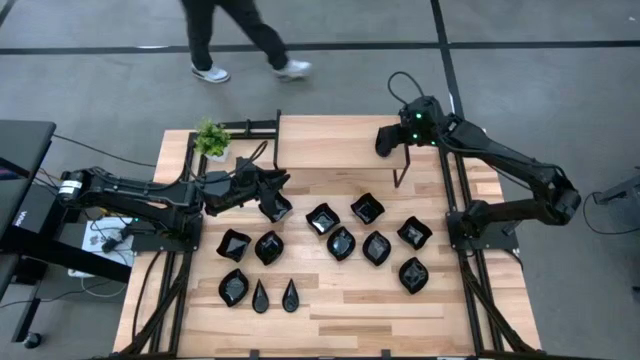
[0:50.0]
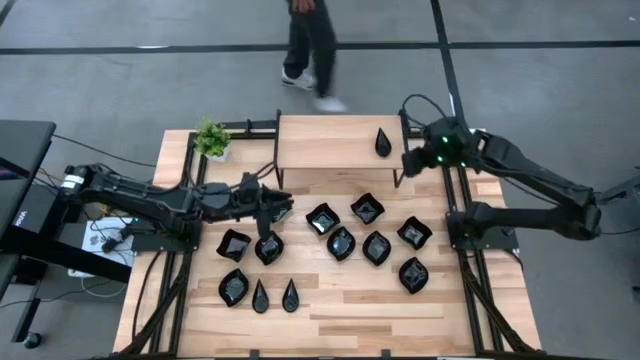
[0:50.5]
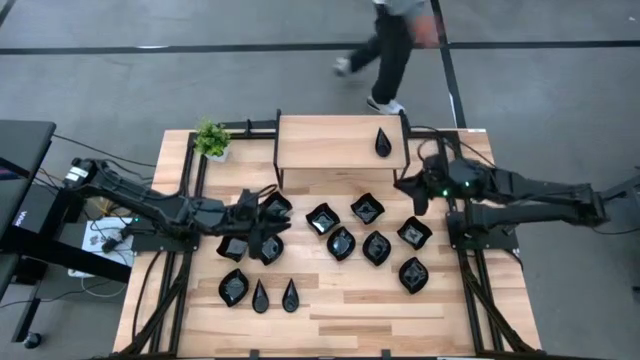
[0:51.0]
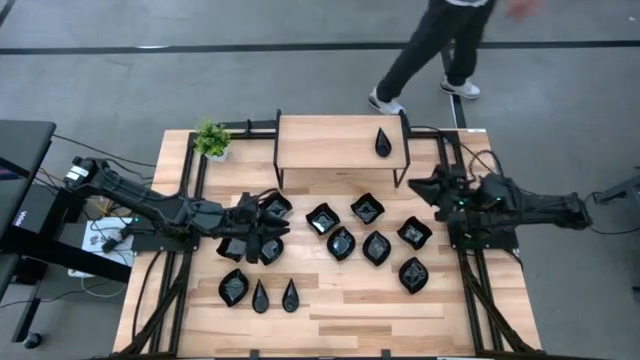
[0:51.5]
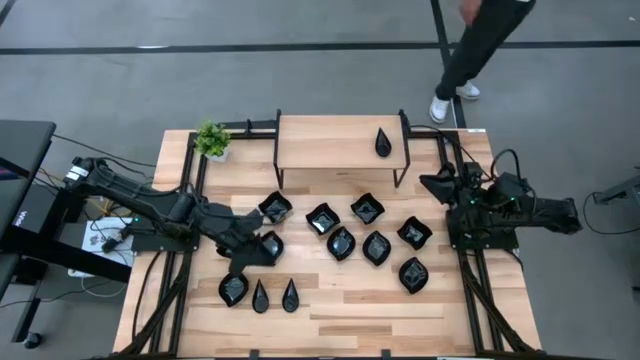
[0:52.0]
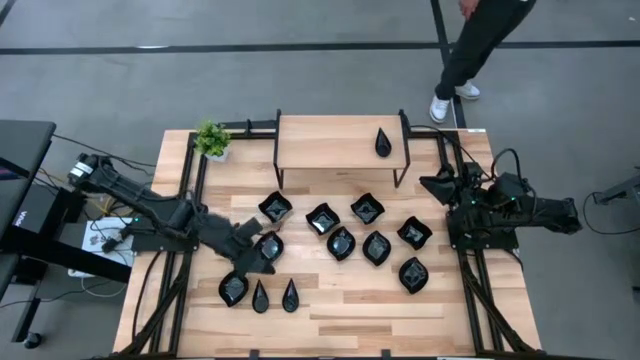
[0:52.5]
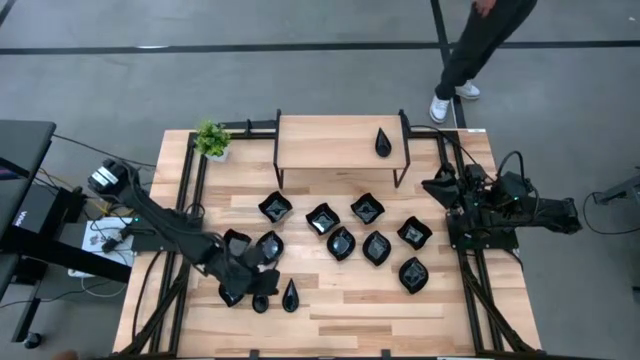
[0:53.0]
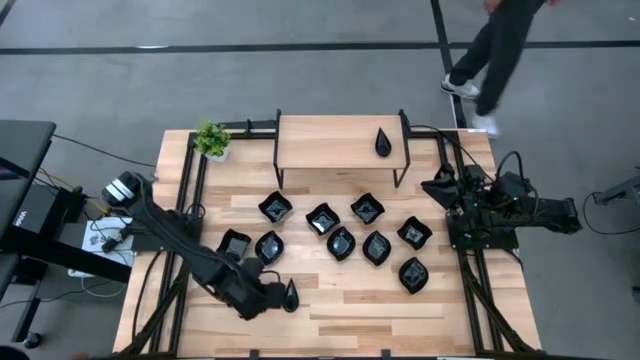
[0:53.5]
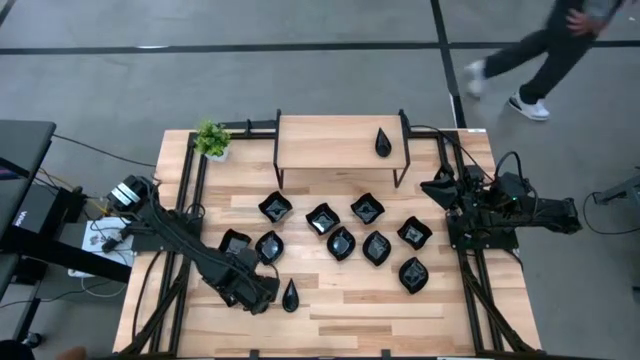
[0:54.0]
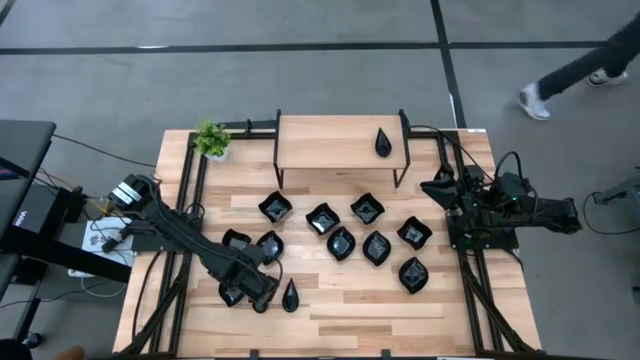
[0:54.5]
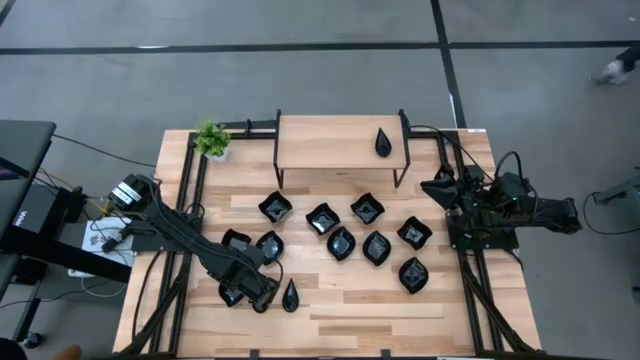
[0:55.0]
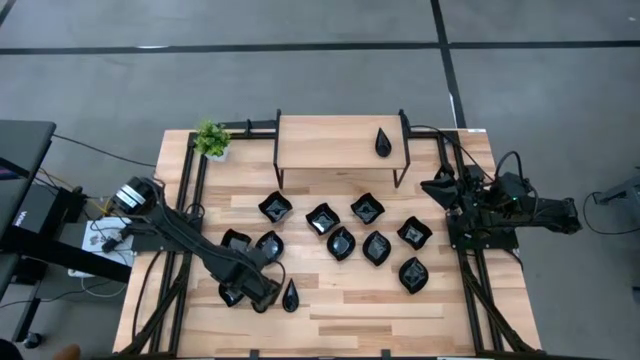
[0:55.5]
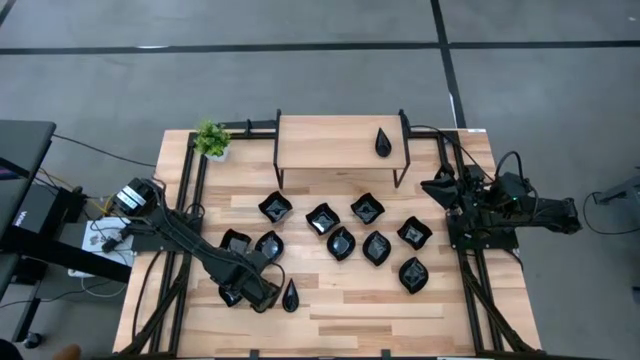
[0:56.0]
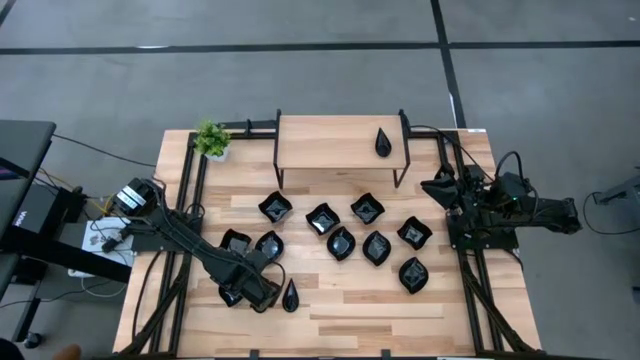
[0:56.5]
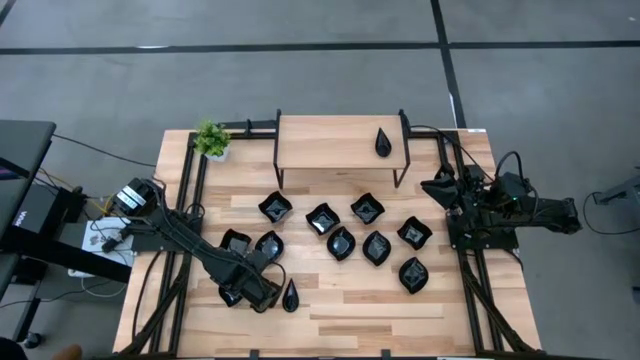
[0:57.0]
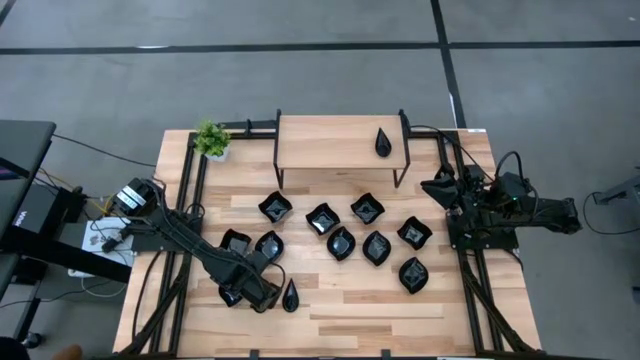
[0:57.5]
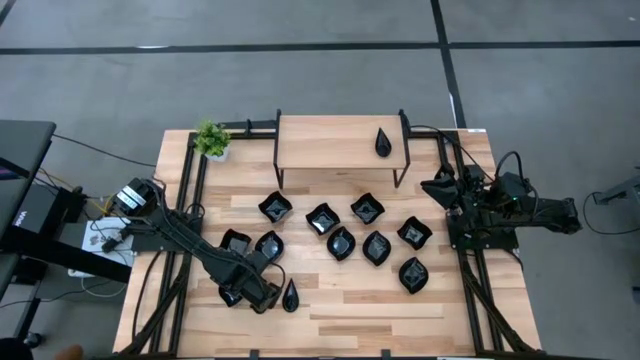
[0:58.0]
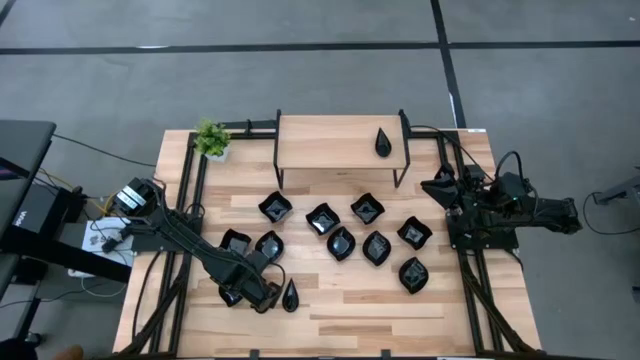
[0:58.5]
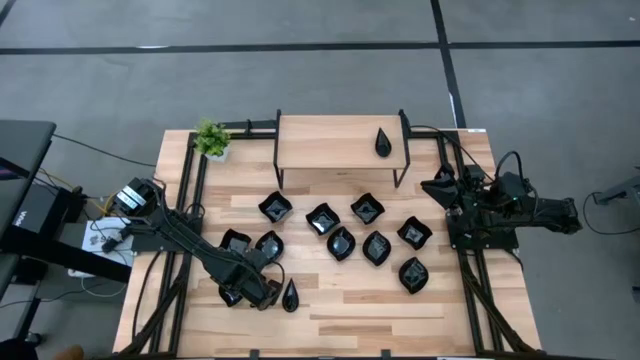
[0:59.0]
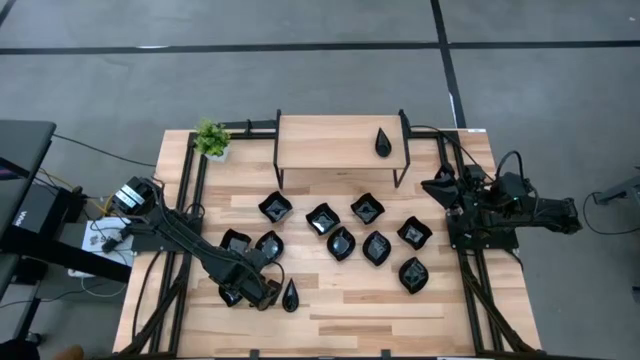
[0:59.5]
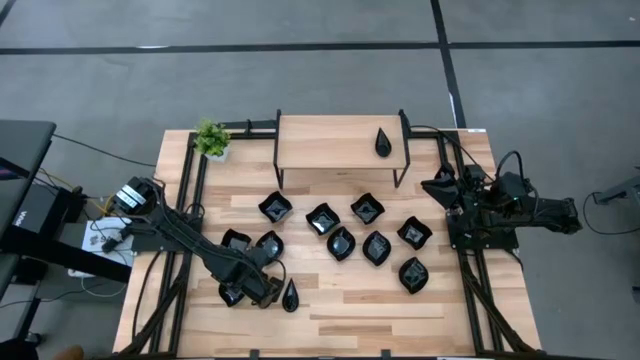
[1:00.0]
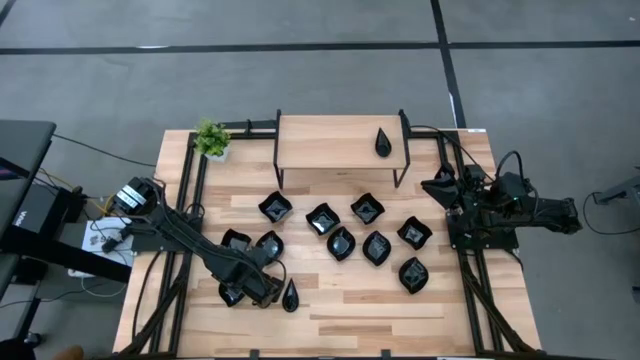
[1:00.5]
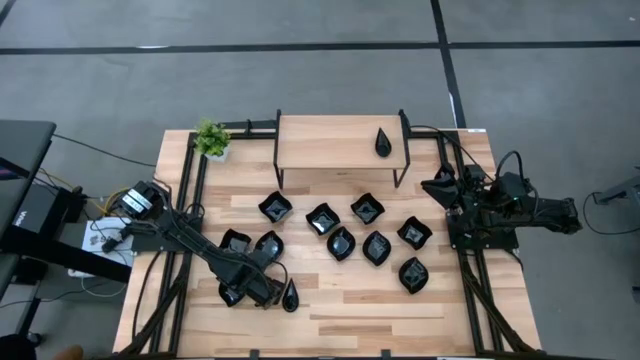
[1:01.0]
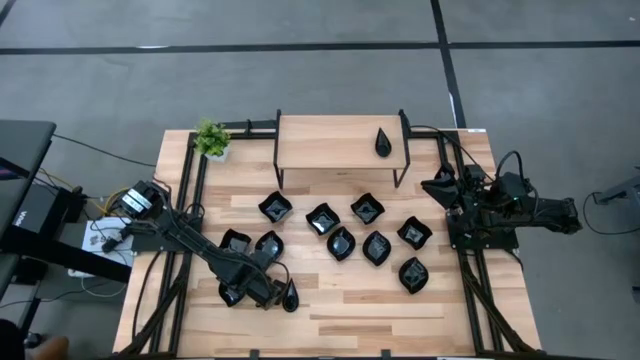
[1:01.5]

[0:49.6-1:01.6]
Task: Pick & Place Mini shaped plates
Stack the black plate on top of the black plate on the shelf

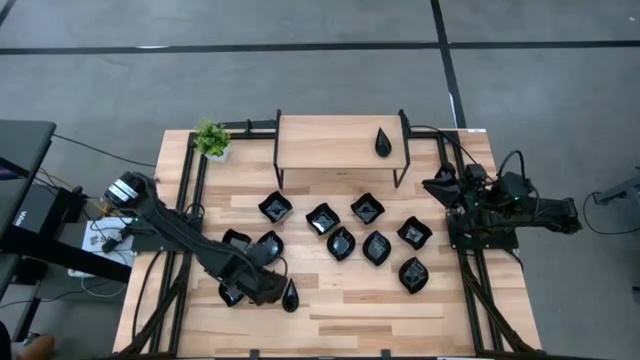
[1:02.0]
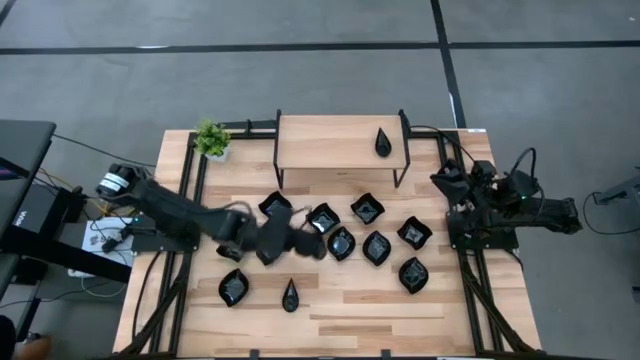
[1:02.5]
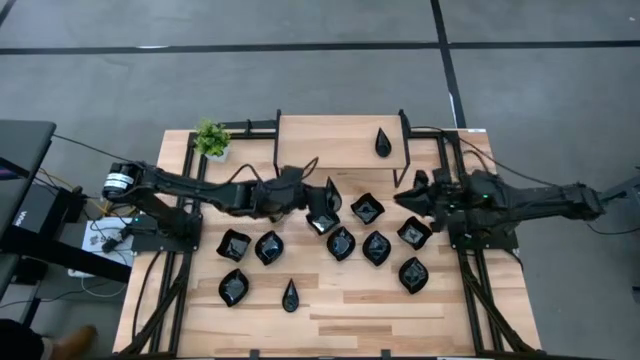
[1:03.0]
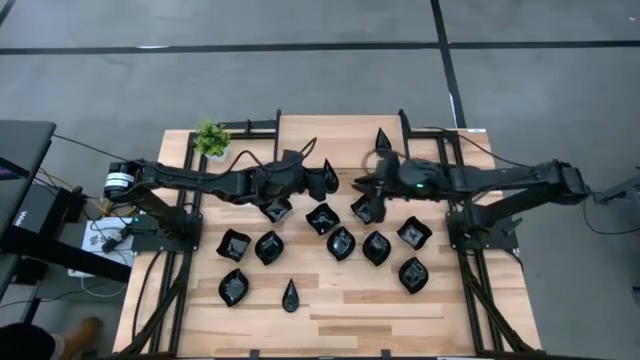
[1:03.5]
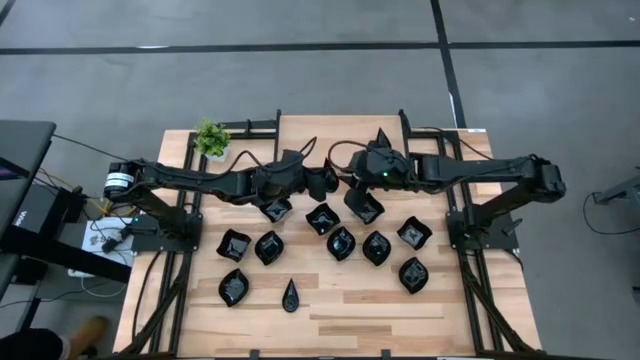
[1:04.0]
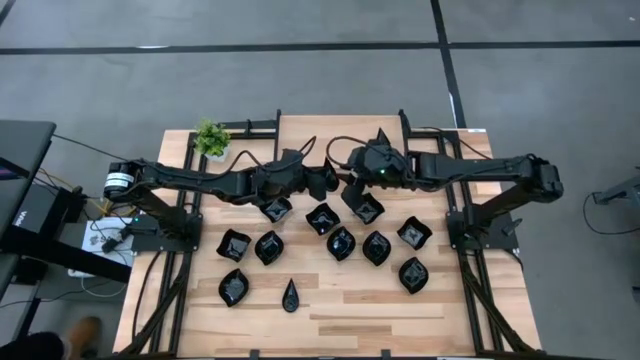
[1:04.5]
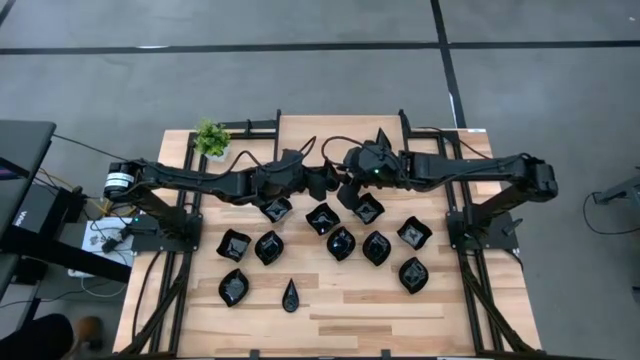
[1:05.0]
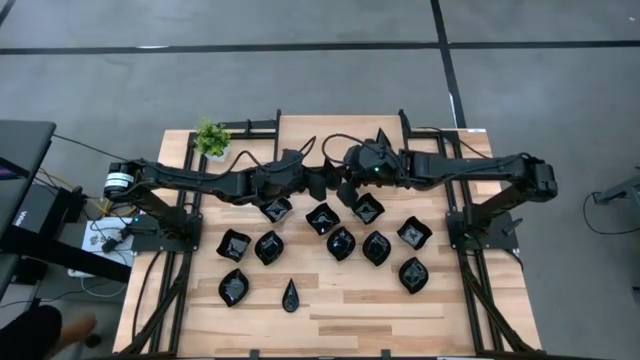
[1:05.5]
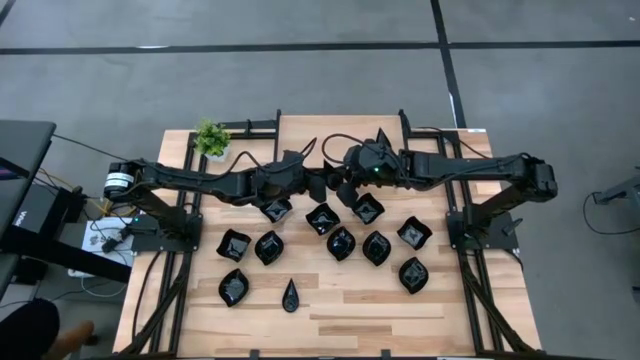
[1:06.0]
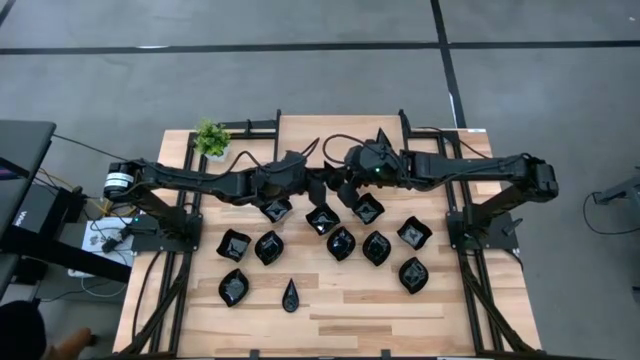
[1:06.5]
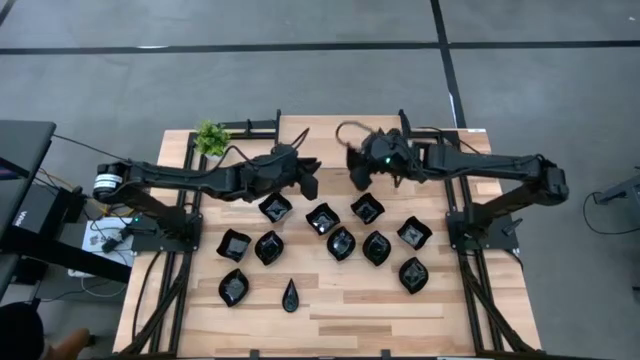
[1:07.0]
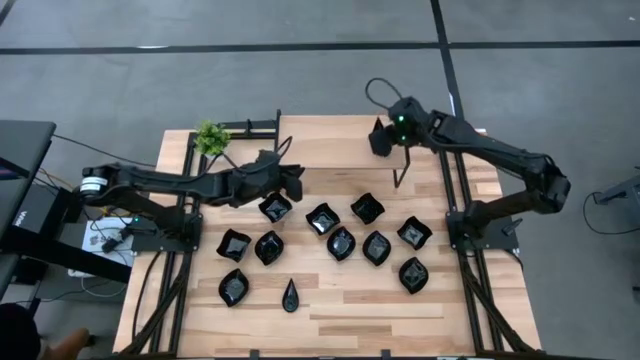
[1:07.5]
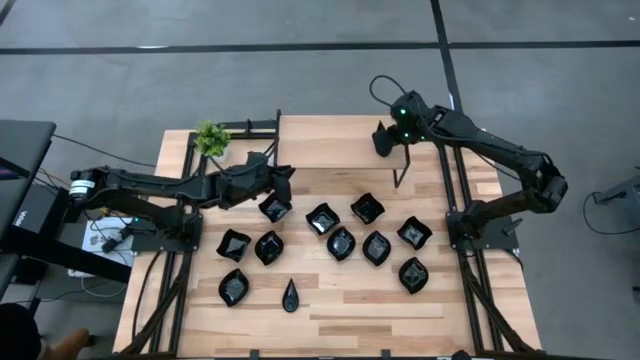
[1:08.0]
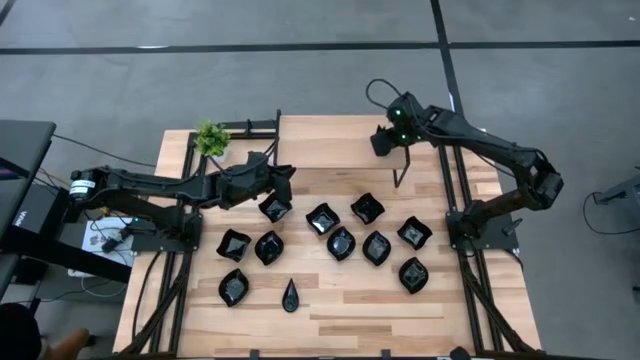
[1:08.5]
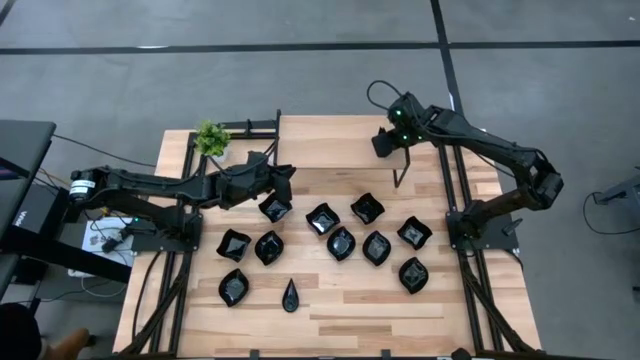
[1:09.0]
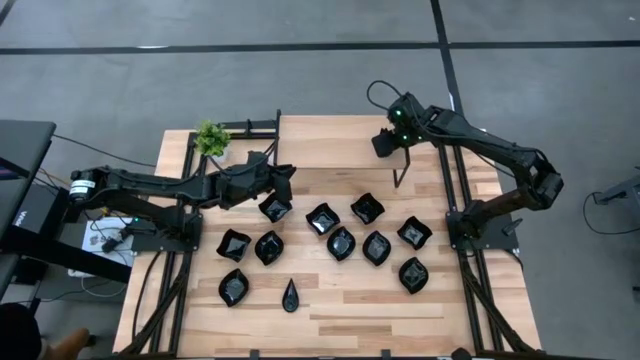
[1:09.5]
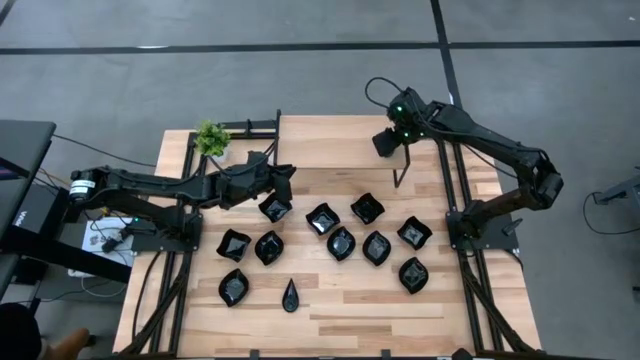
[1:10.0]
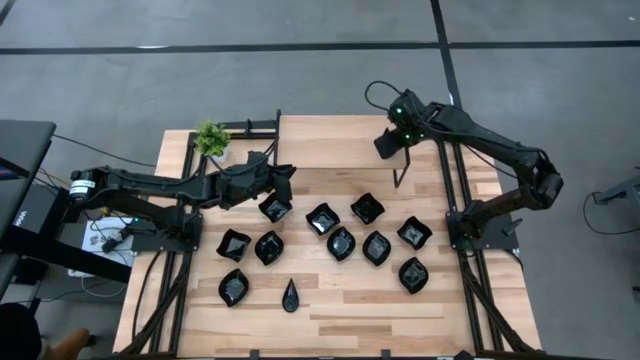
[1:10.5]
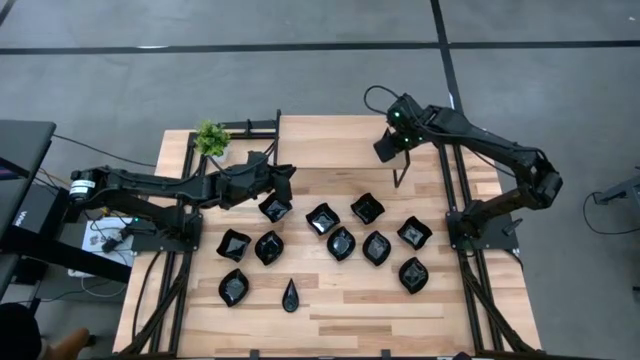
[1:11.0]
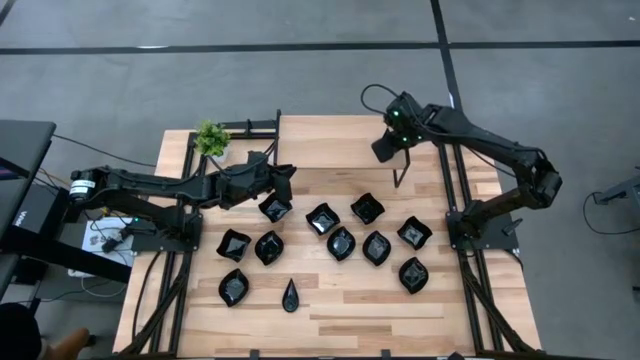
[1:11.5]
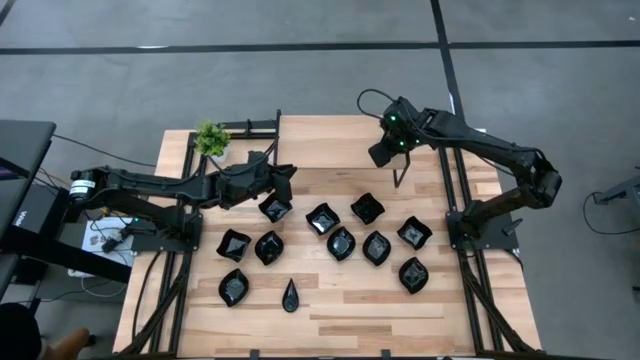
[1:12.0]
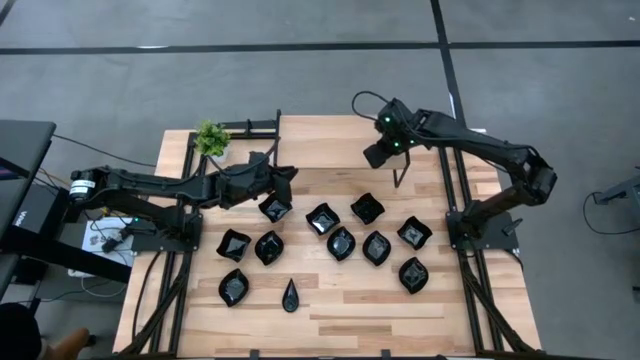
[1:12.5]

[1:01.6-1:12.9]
Stack the black plate on top of the black plate on the shelf
